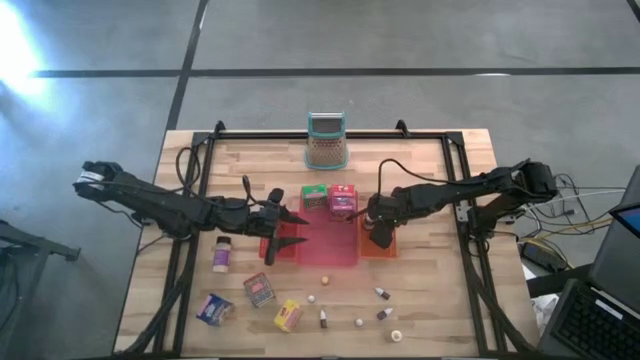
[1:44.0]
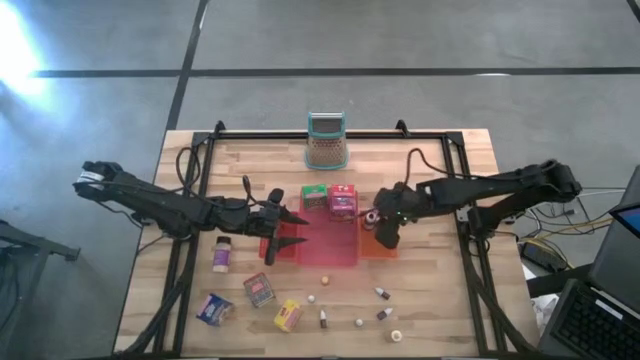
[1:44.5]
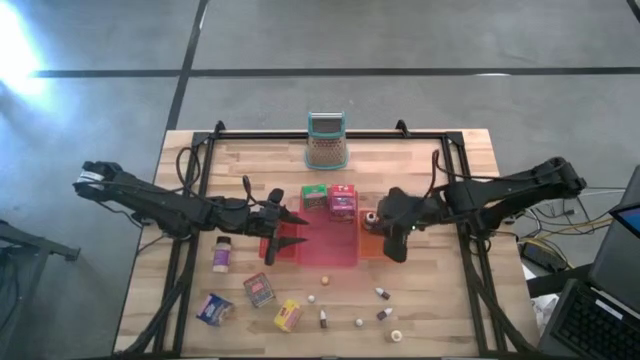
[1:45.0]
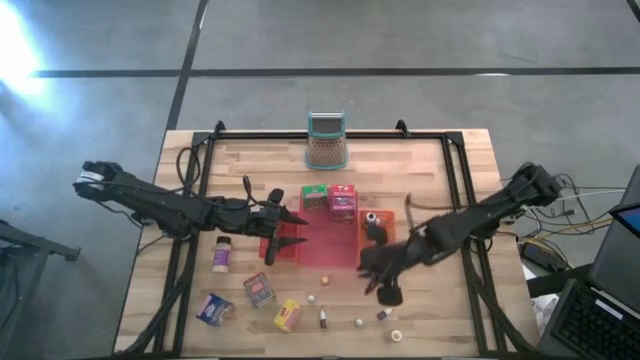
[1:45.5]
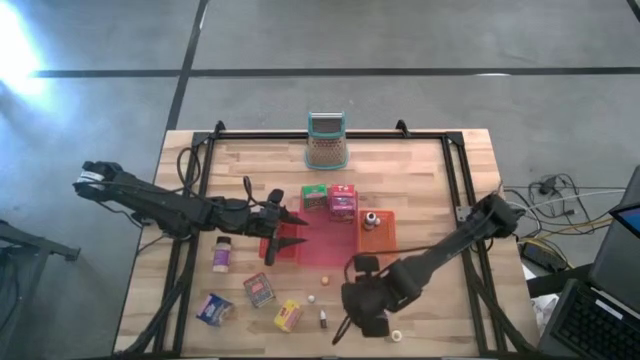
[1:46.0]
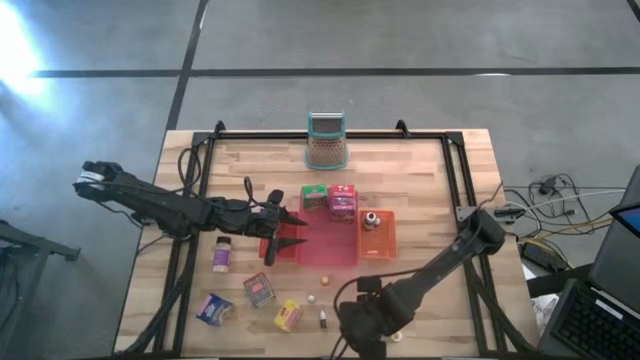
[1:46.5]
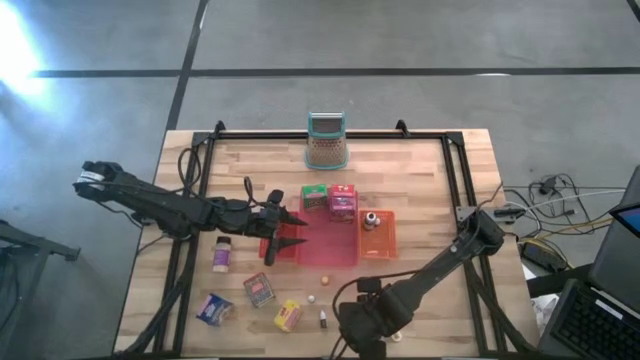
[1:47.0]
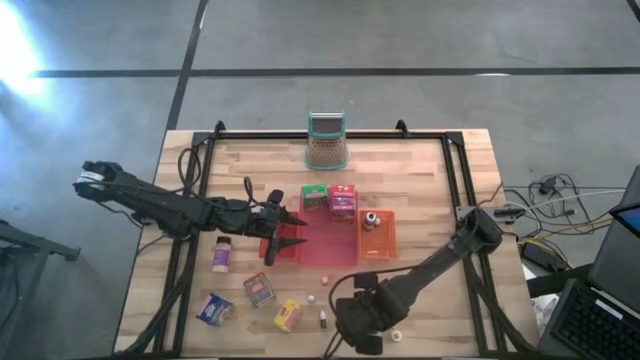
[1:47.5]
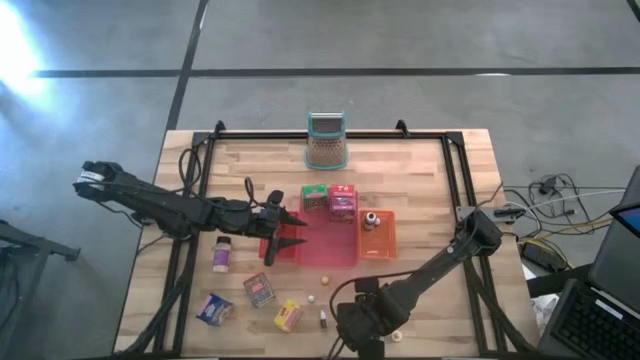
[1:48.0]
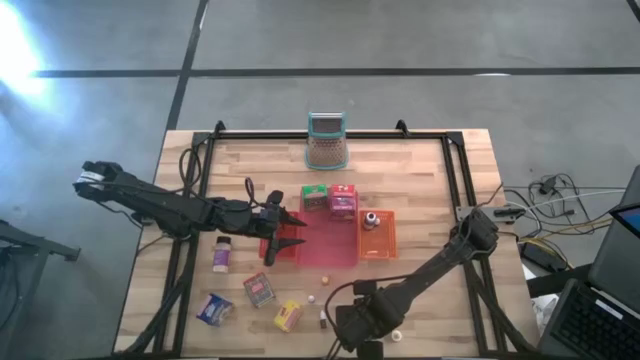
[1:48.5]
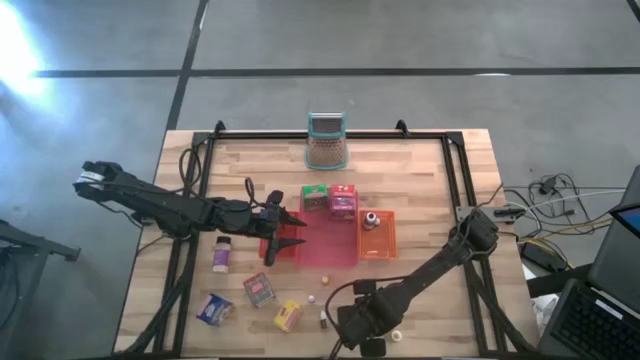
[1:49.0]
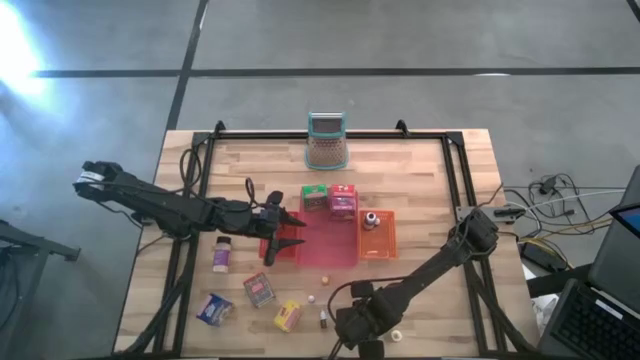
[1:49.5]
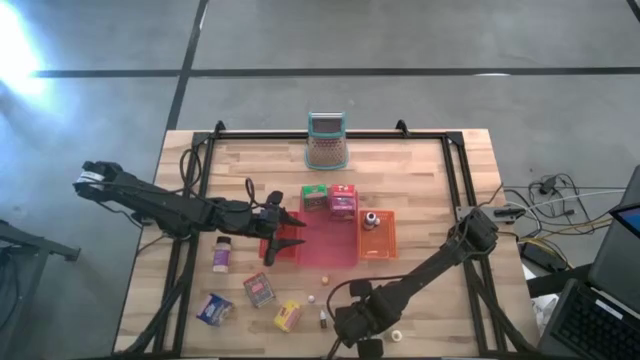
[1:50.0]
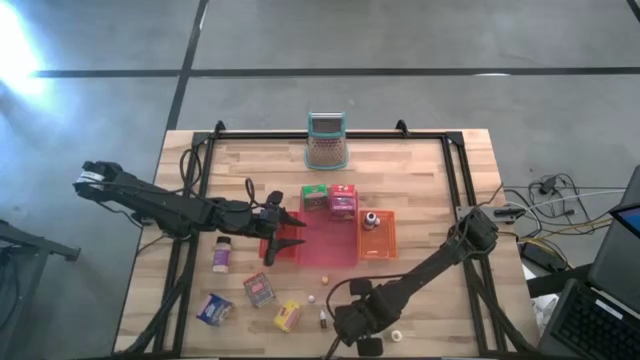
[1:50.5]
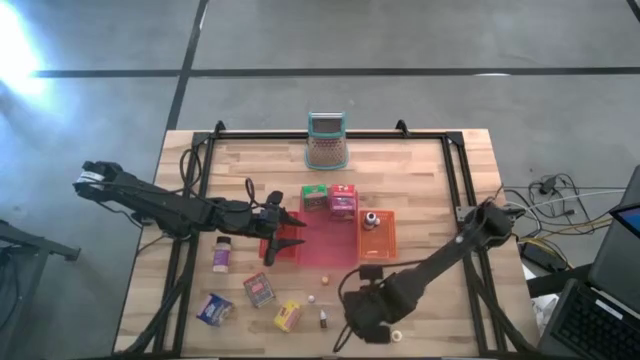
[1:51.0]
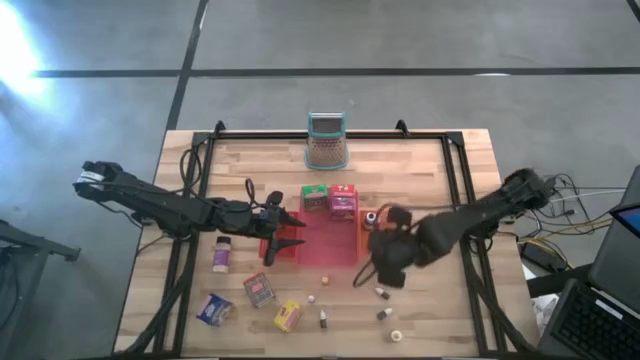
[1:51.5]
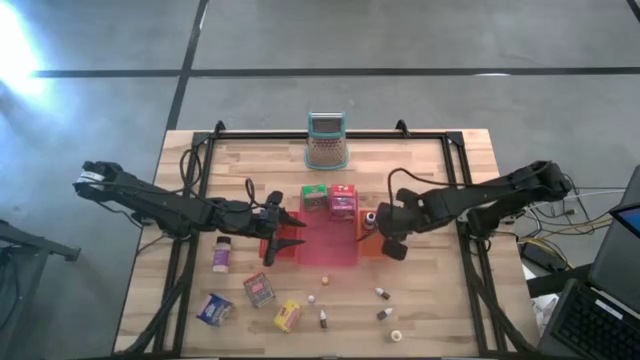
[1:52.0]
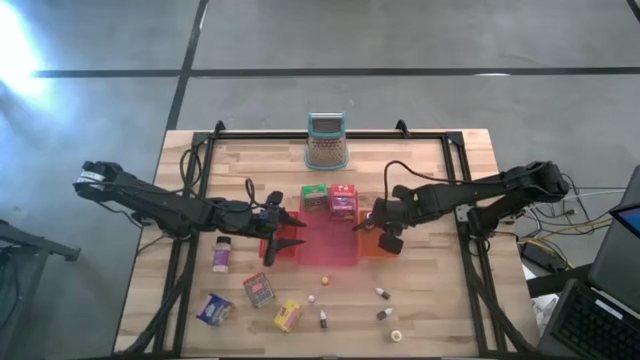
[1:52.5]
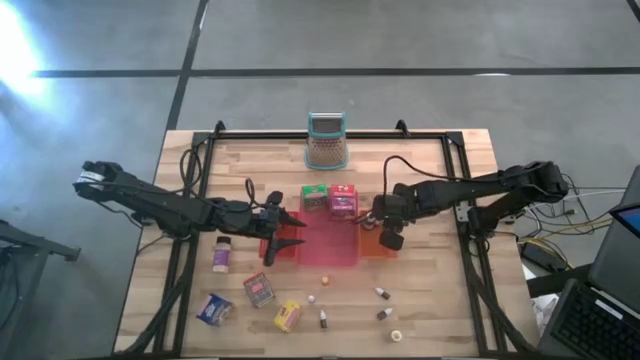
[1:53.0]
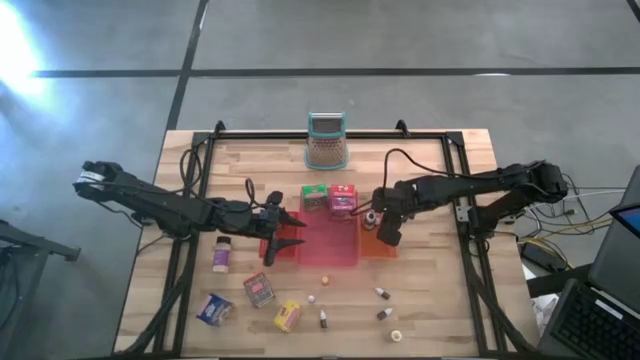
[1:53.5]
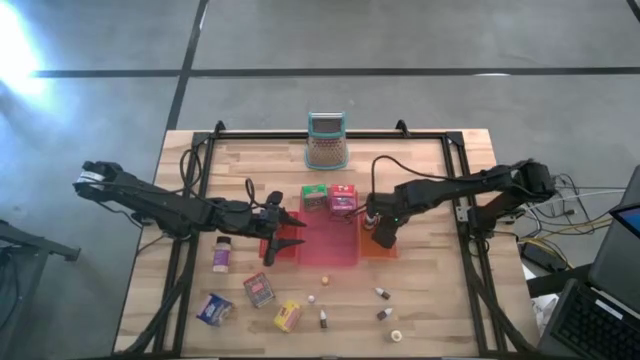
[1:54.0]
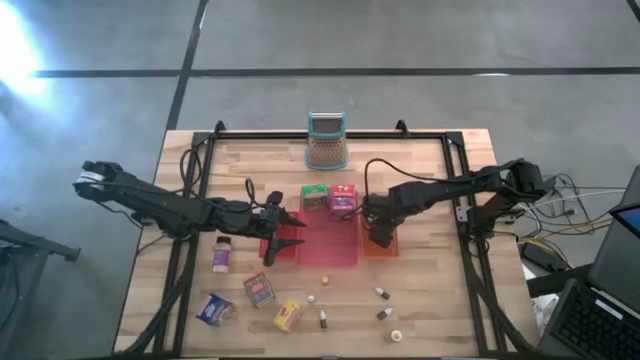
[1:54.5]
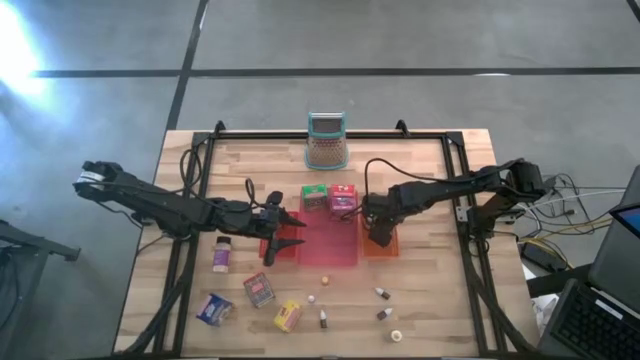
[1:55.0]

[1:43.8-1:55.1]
Task: Pick & Place Kitchen Items
Put the small green food coloring bottle into the orange bin

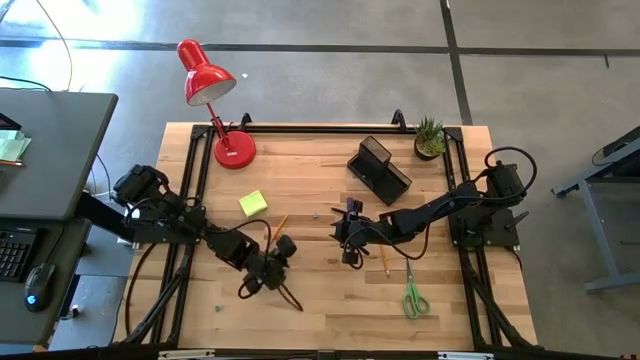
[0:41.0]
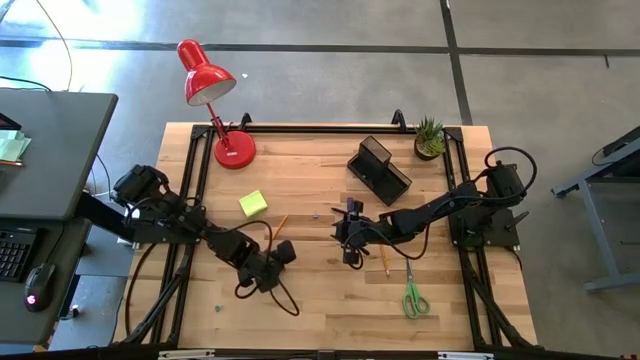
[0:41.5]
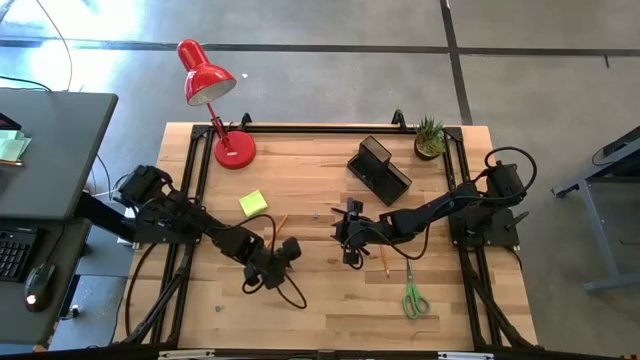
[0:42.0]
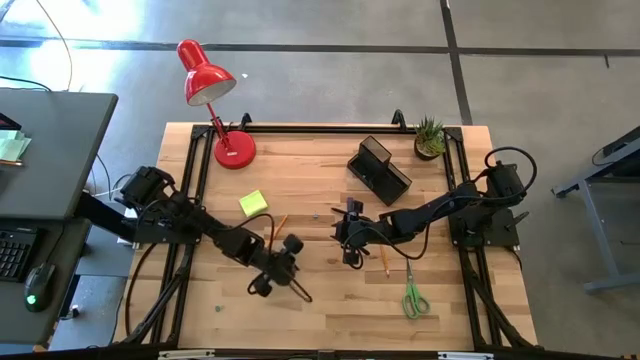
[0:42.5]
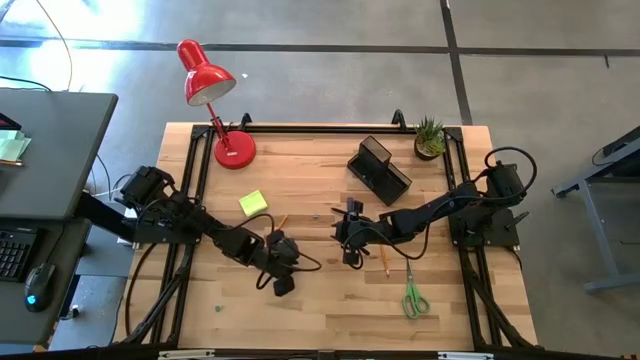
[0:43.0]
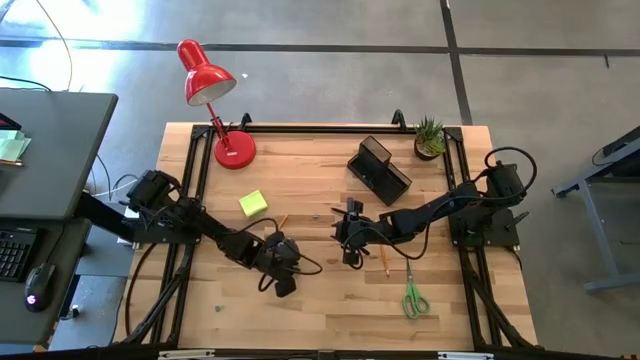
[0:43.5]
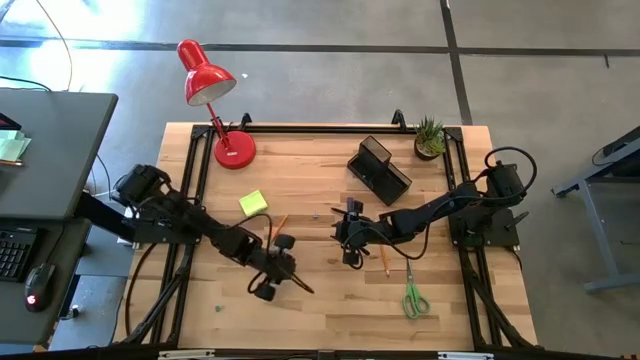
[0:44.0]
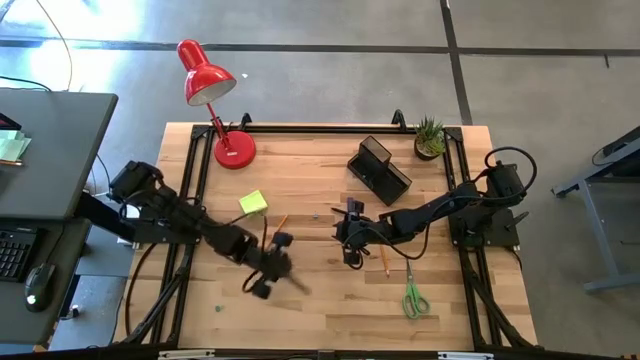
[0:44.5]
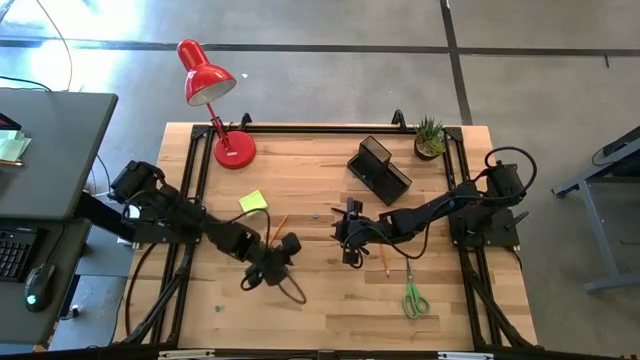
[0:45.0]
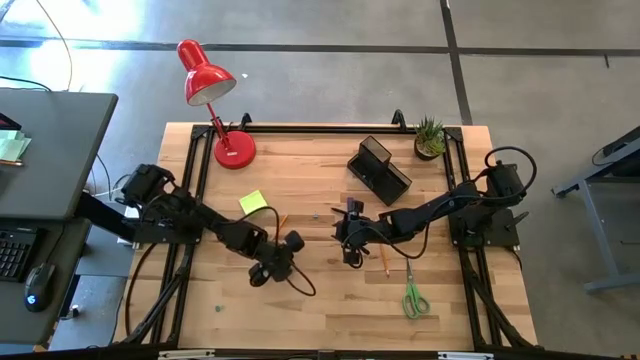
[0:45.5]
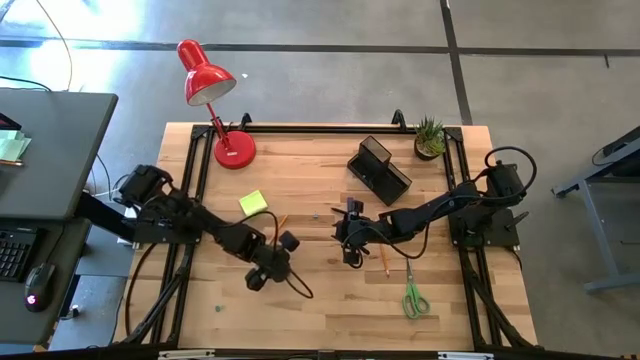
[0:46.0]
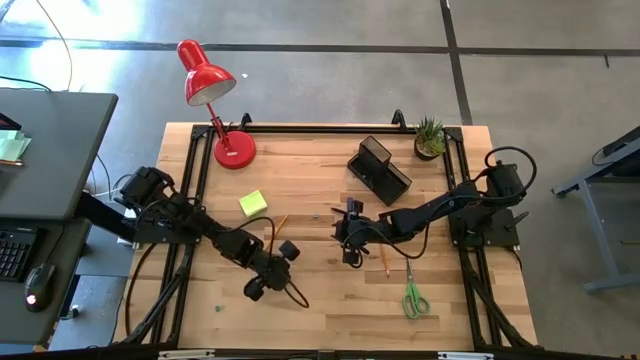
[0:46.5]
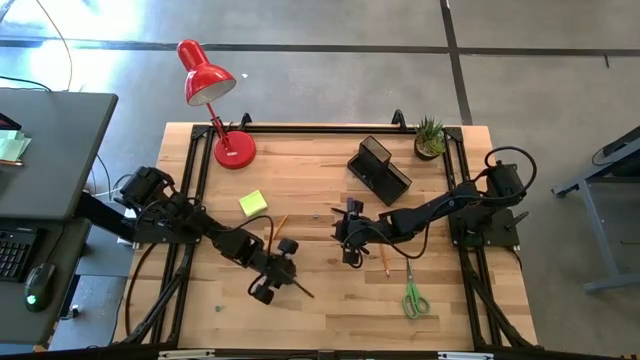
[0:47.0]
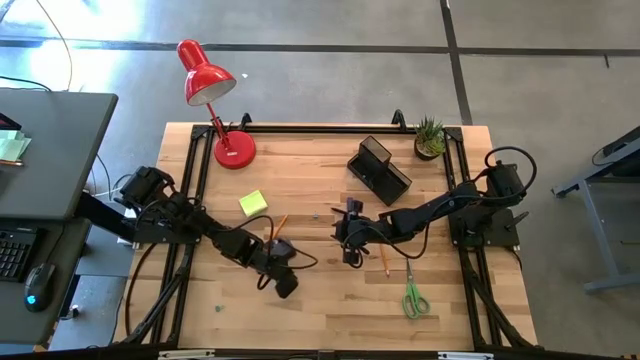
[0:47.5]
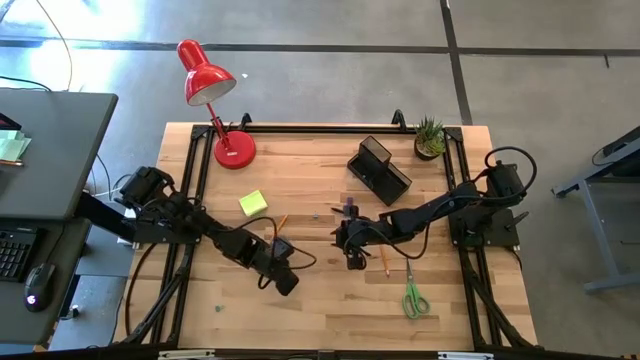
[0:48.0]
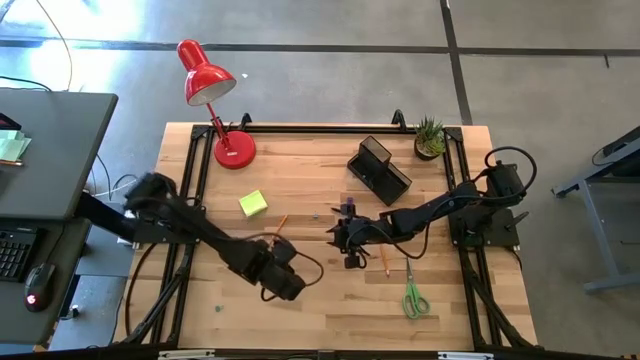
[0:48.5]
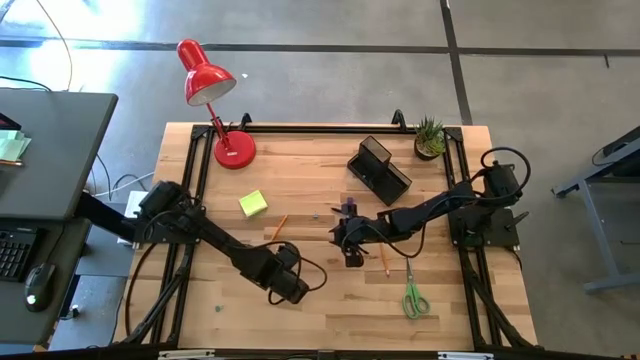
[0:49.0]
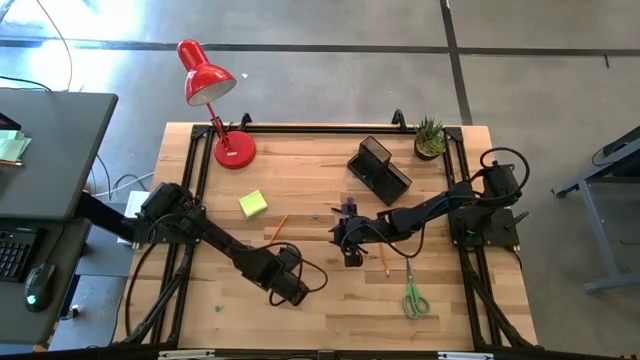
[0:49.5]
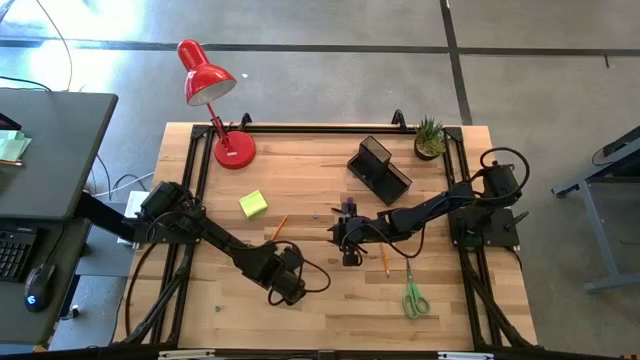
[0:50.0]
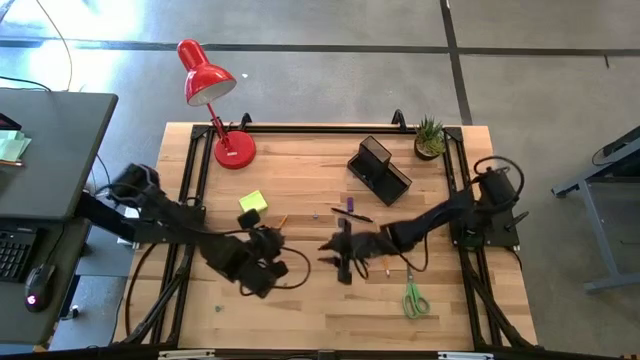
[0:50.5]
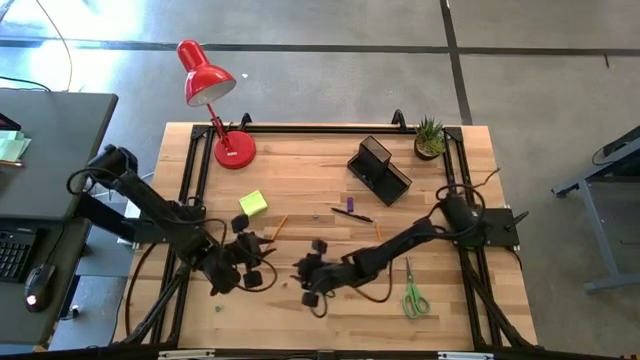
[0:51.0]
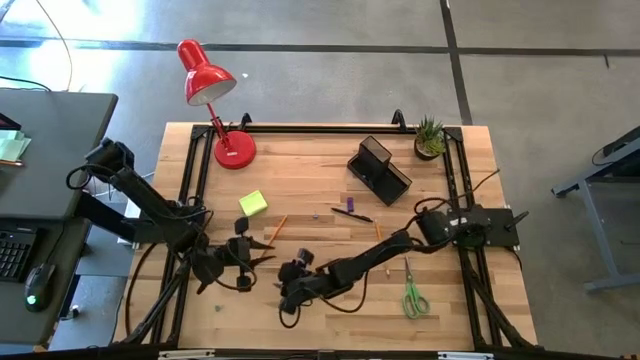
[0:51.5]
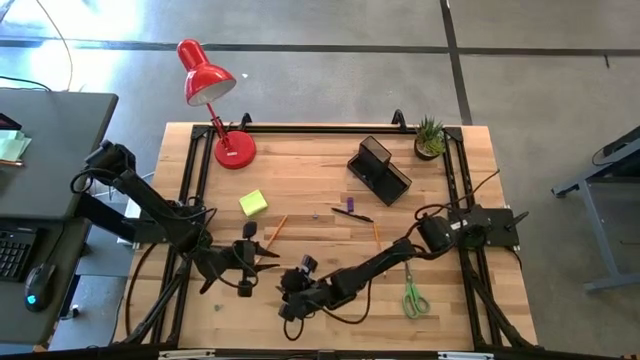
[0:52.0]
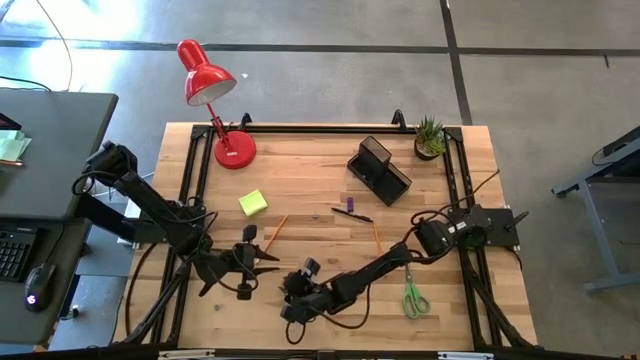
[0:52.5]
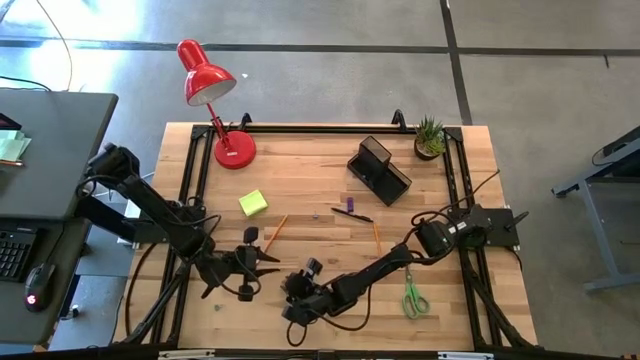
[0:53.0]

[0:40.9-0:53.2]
Task: Pick and place office supplies into organizer
Put the pink binder clip into the black desk organizer
